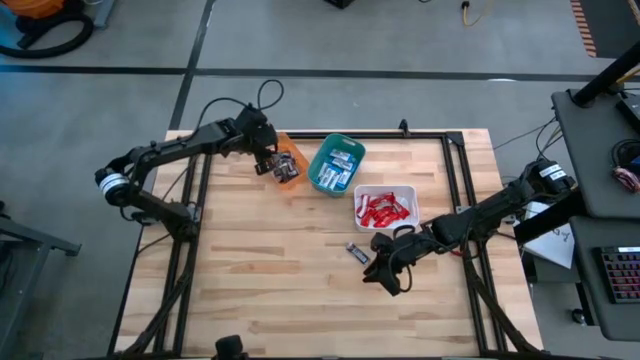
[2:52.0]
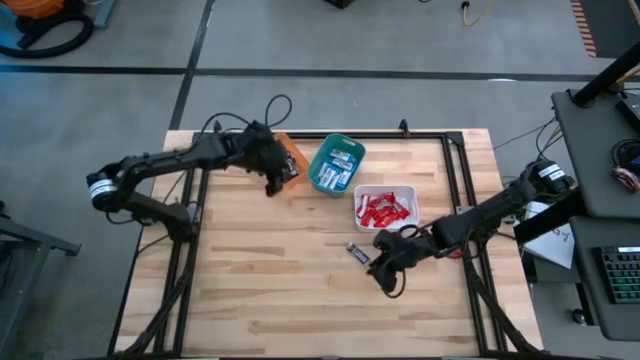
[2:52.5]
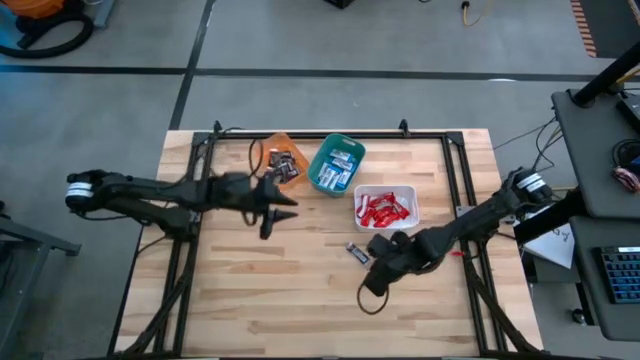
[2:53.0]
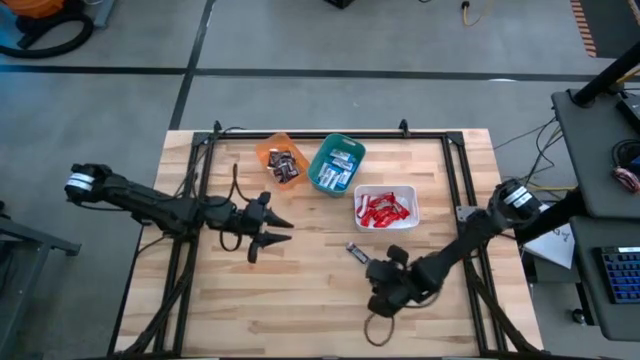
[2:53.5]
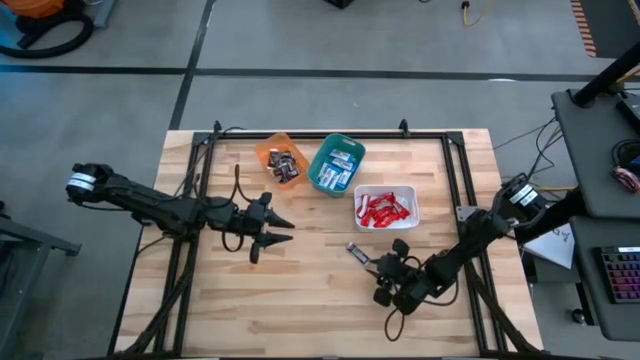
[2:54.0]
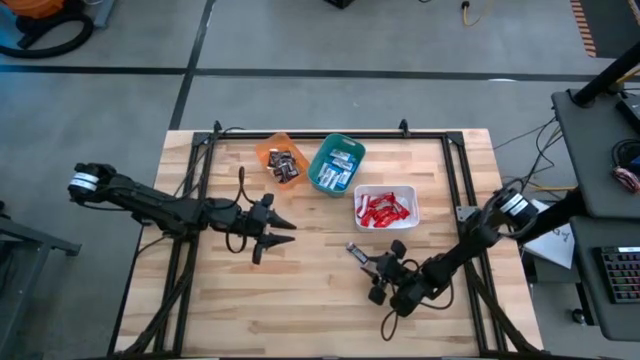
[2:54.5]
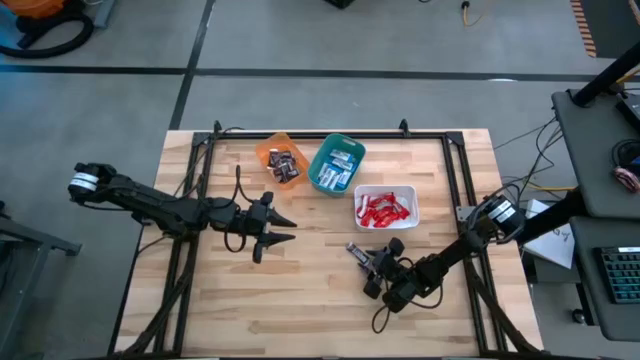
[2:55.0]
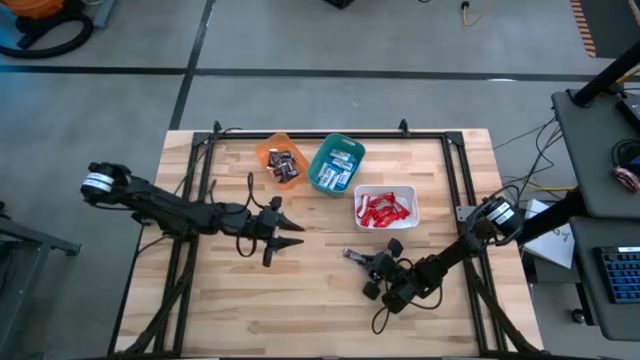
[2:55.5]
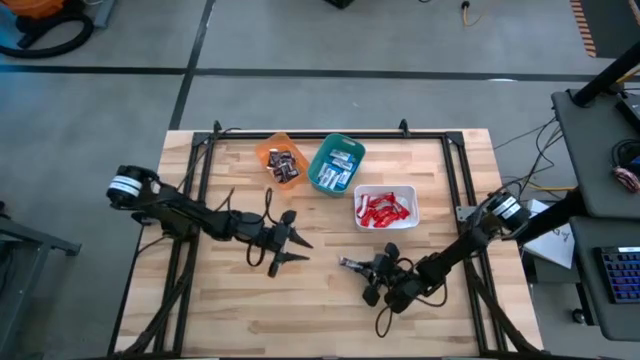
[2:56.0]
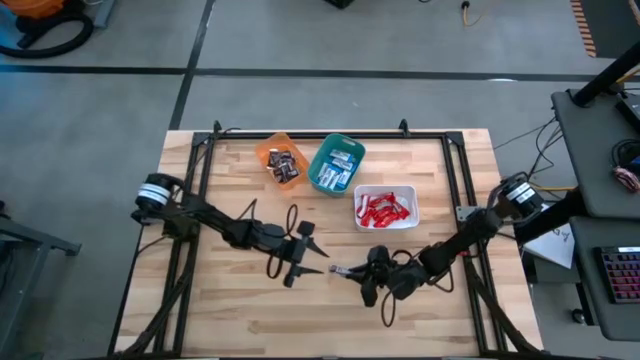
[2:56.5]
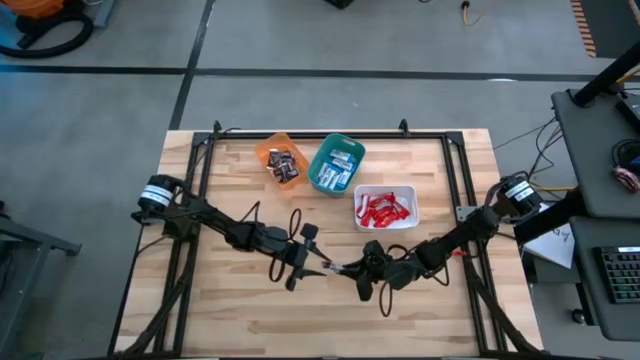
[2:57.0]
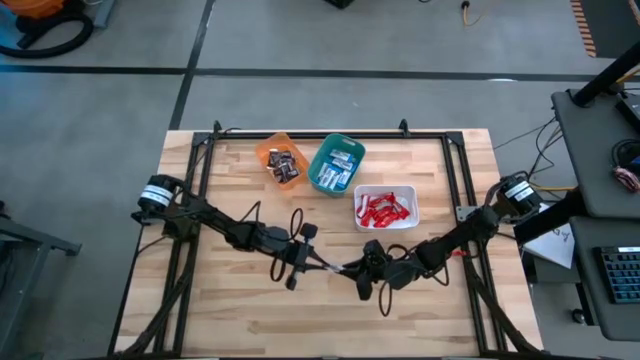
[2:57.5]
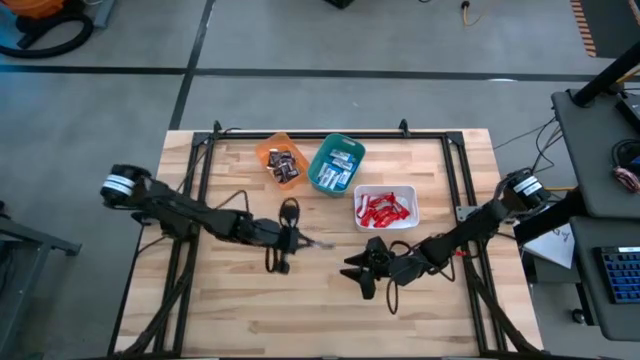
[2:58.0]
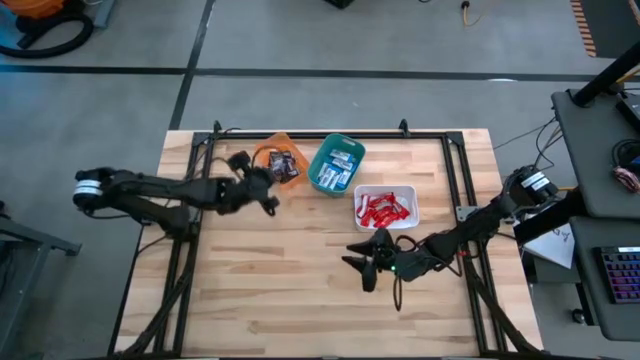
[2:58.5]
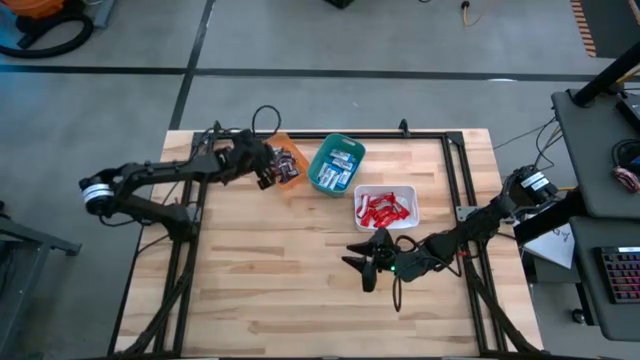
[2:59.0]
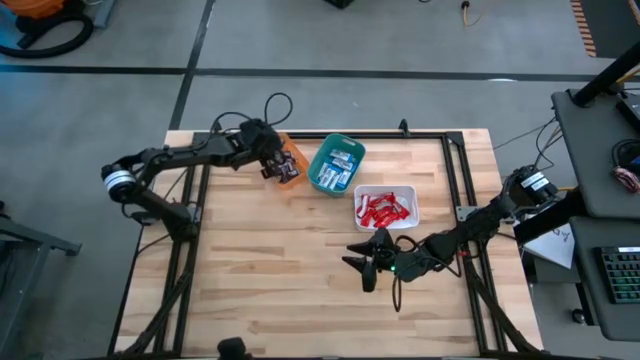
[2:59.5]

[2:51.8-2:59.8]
Task: Sort candy
Put the brown chocolate bar into the orange bin

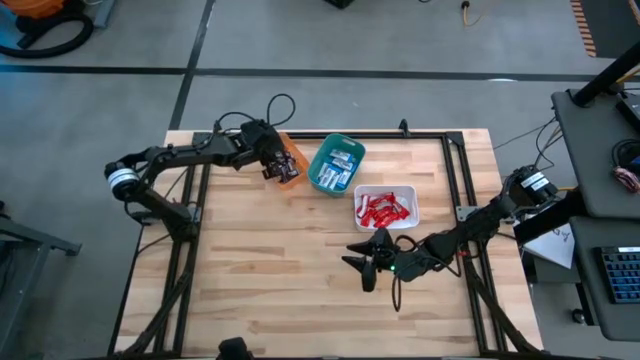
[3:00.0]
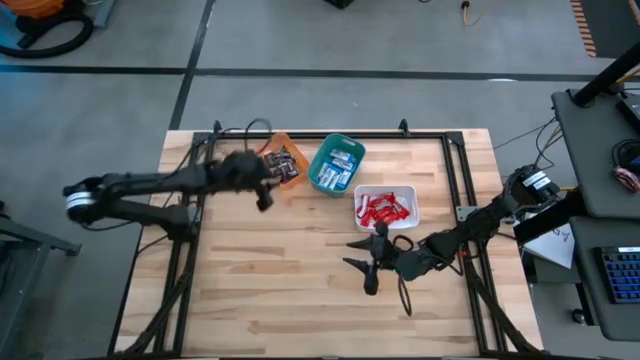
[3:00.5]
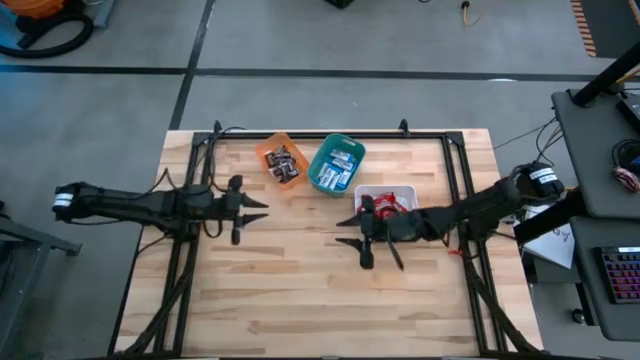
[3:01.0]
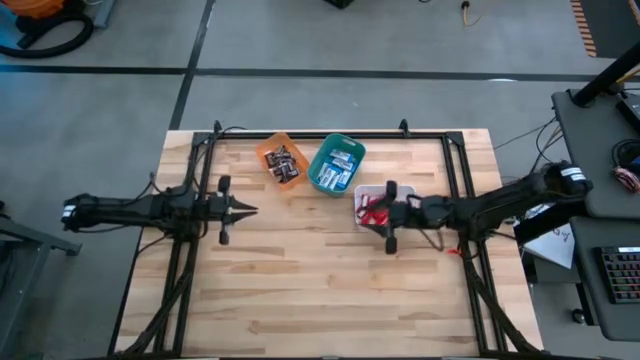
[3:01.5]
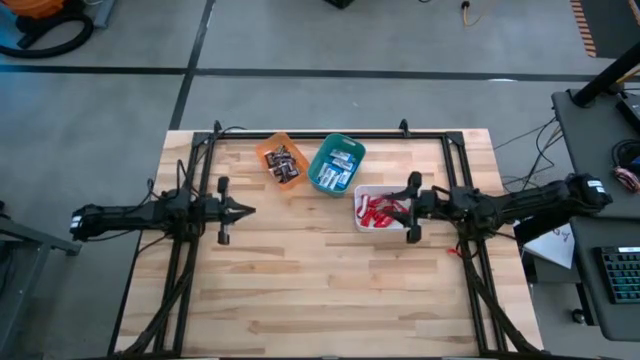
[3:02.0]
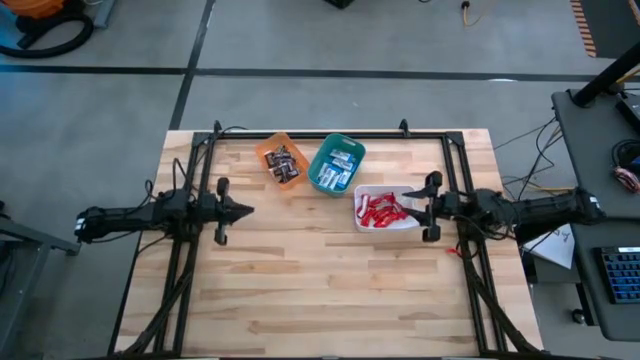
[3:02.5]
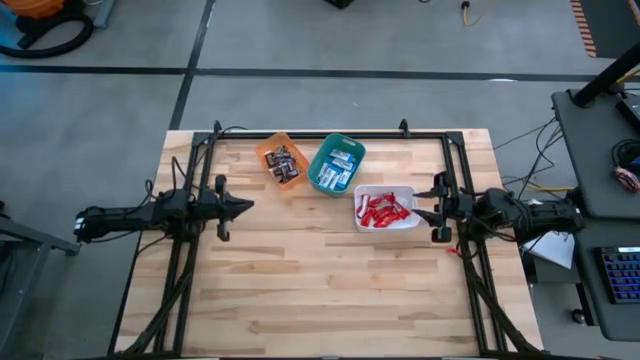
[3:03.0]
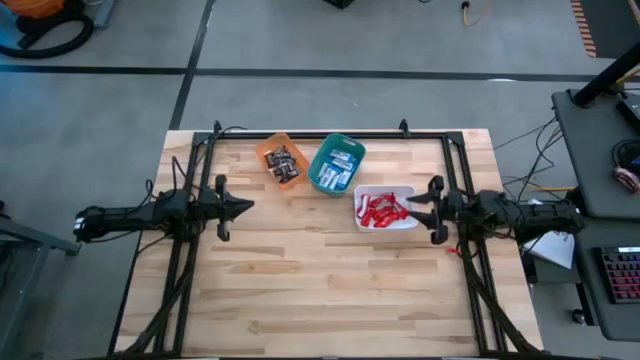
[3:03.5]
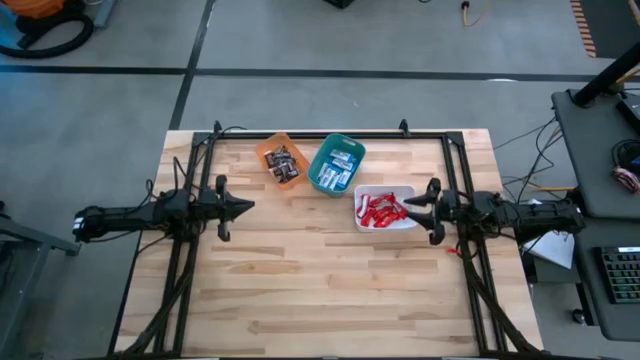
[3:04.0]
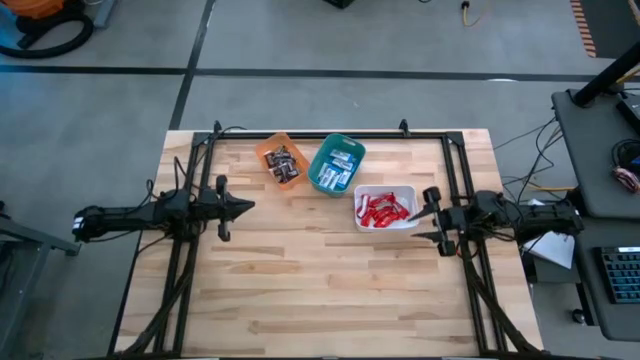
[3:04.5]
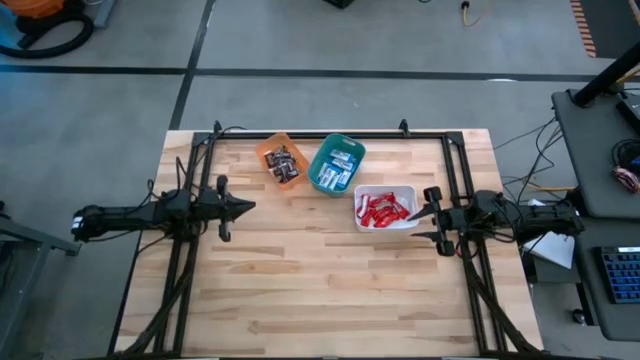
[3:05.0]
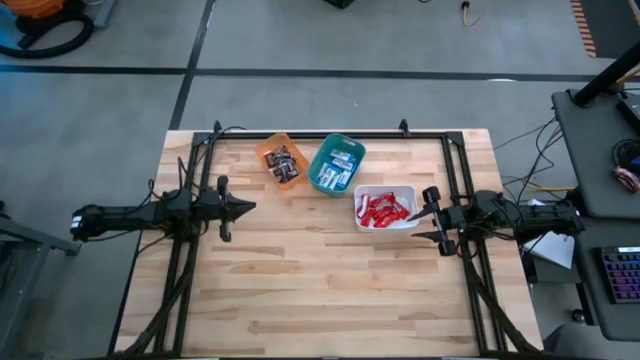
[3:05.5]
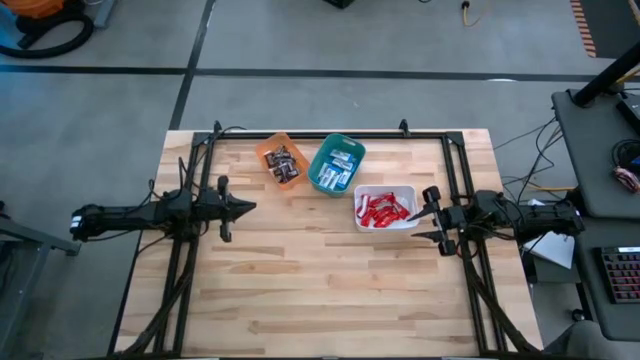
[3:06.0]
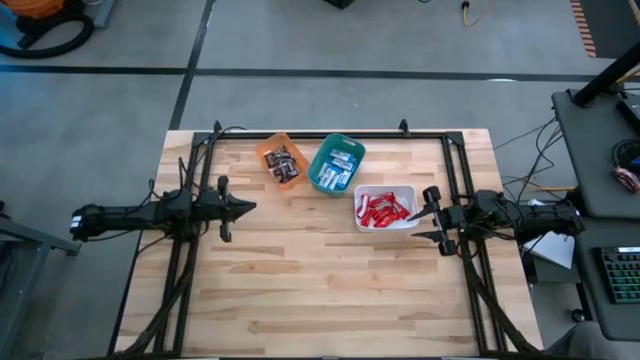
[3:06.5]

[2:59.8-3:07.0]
Return to Home Position

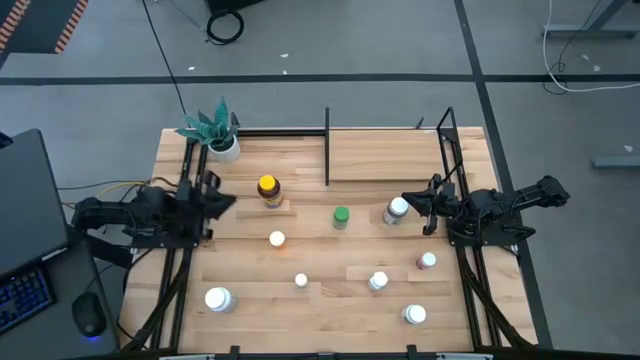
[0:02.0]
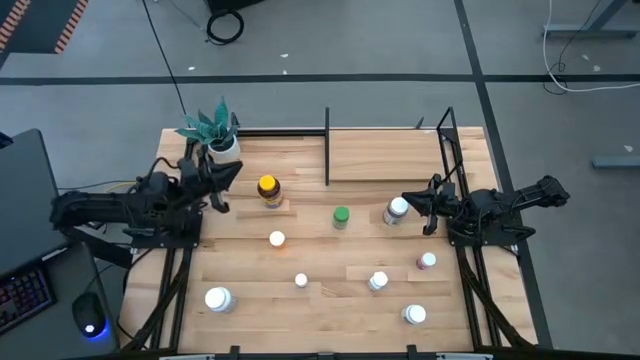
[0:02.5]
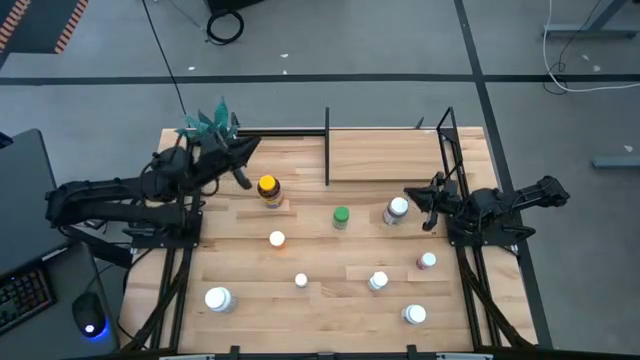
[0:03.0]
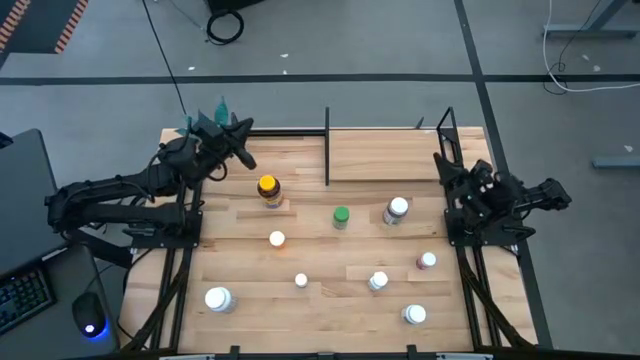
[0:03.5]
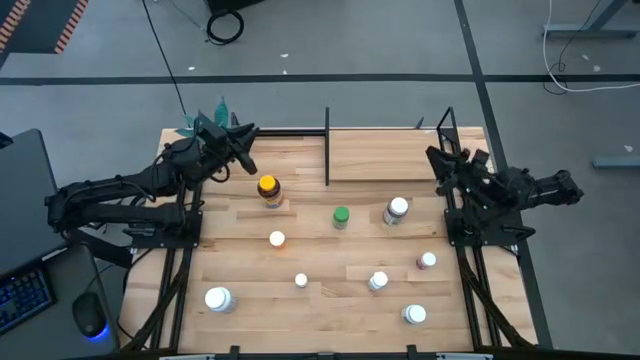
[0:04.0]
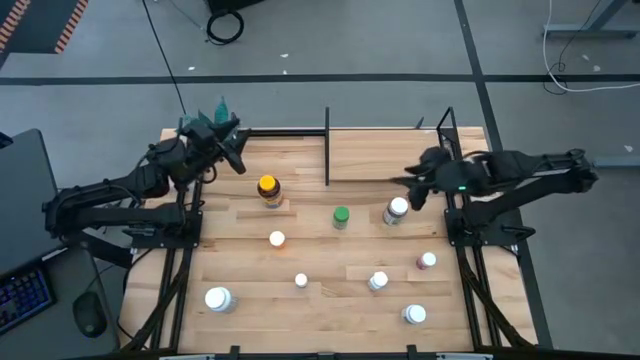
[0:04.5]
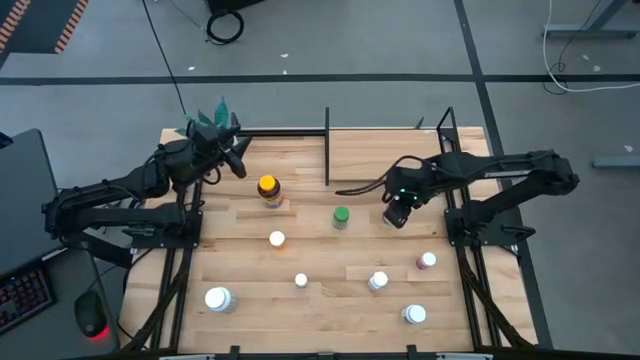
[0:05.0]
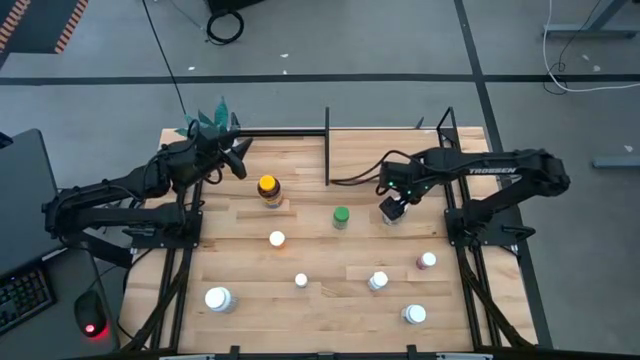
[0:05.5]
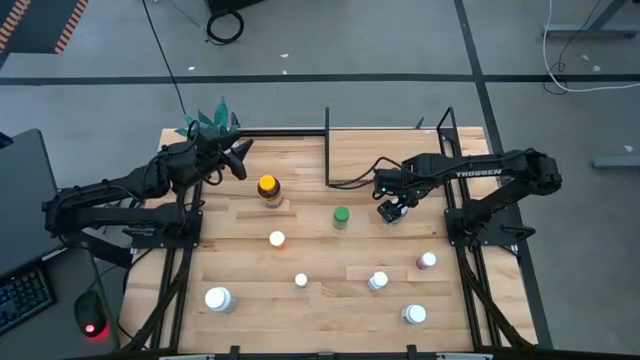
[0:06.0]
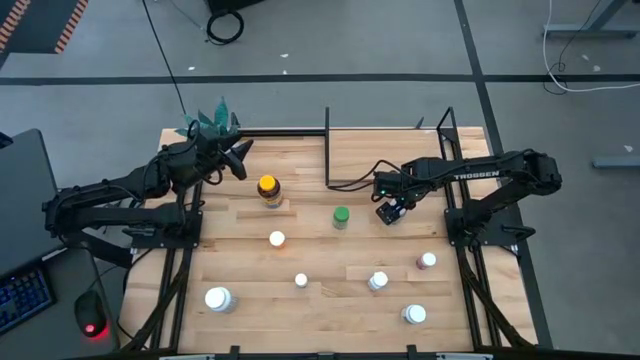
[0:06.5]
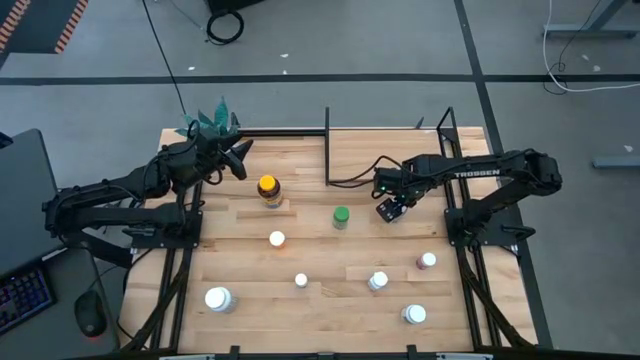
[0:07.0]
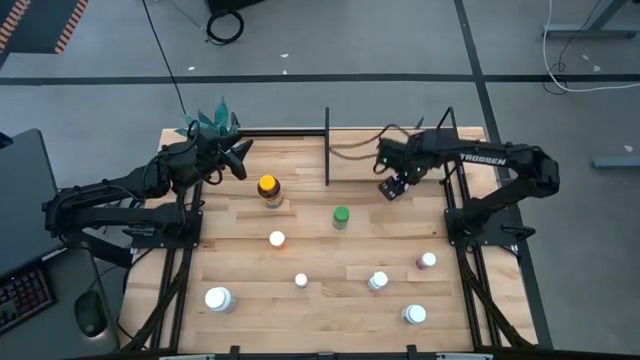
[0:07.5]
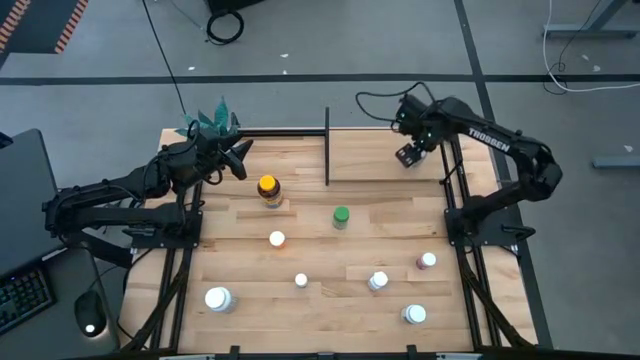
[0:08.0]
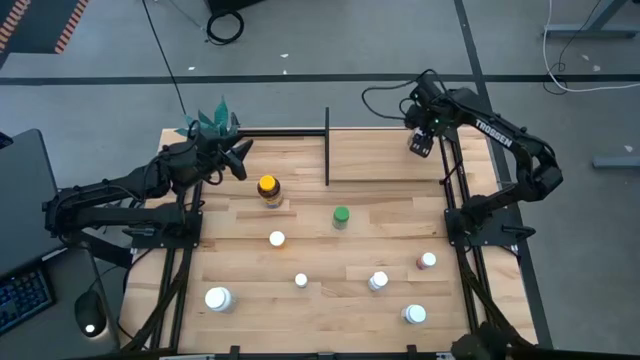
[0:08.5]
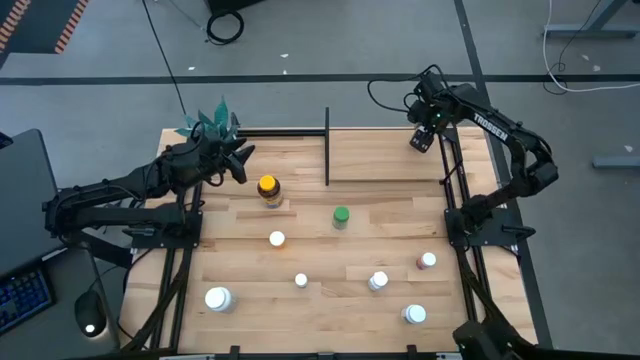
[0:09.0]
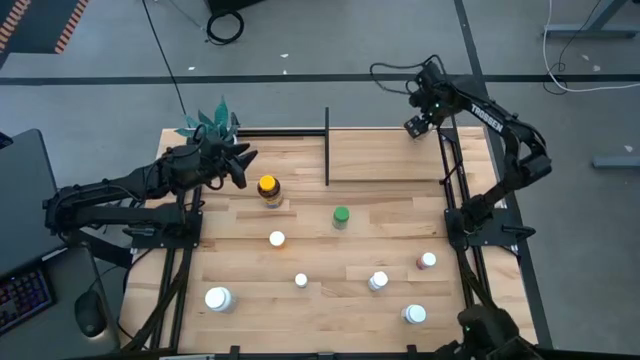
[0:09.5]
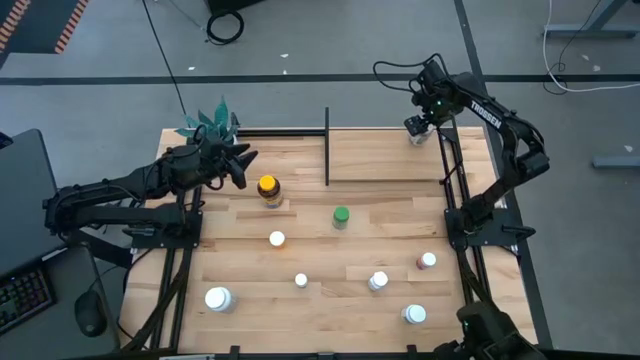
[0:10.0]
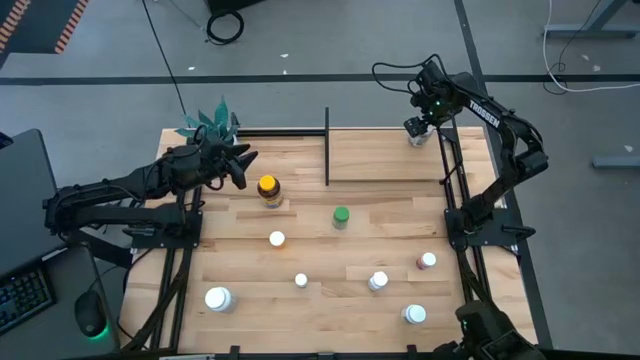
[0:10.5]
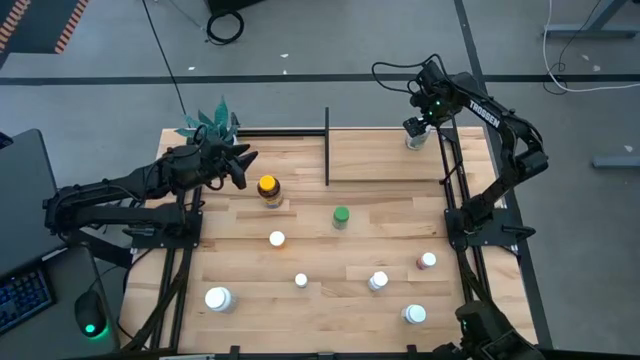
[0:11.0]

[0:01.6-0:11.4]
Task: Pick and place medicine bottles onto shelf by color
Put the transparent pill bottle on the shelf
